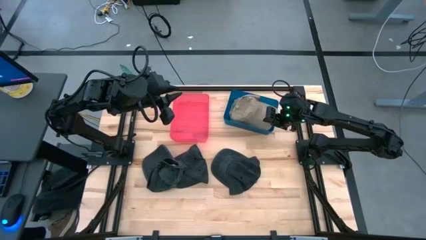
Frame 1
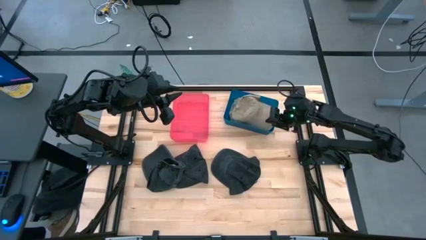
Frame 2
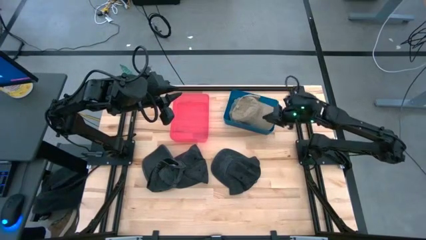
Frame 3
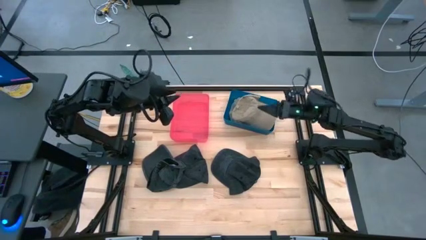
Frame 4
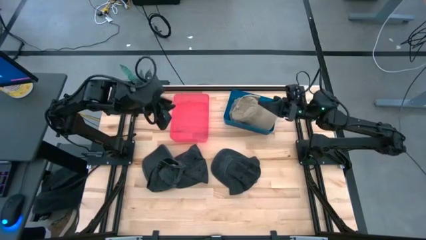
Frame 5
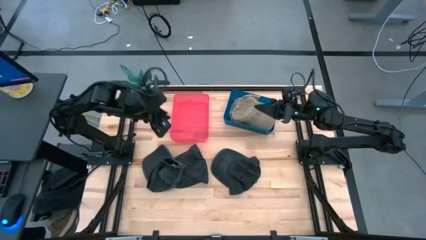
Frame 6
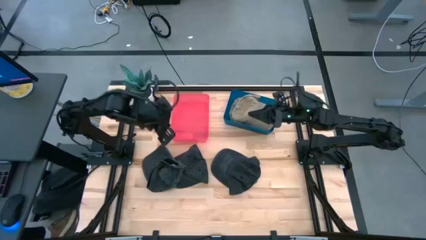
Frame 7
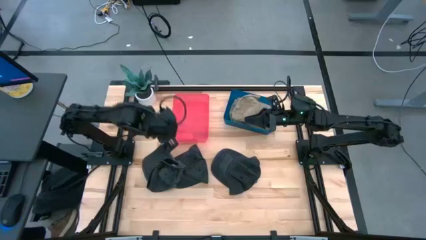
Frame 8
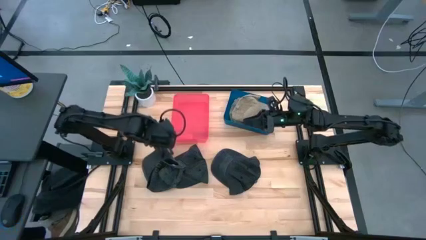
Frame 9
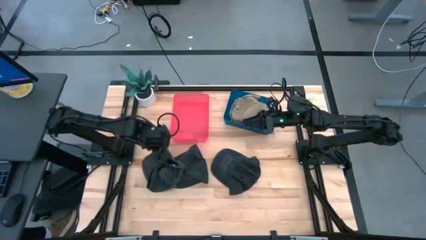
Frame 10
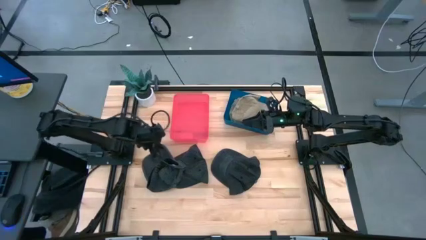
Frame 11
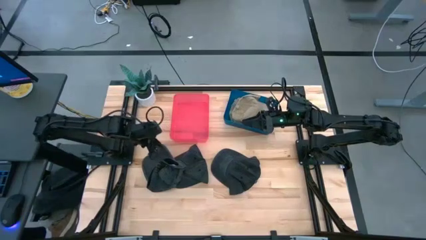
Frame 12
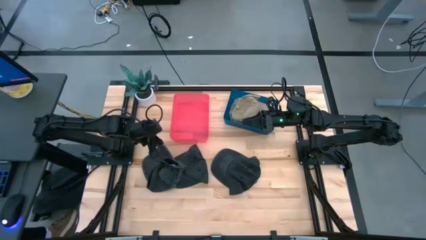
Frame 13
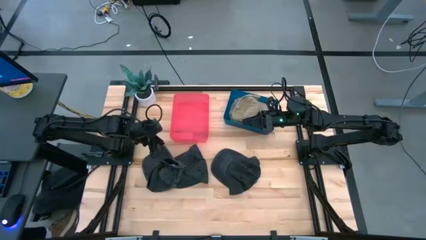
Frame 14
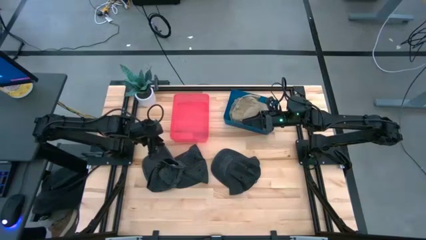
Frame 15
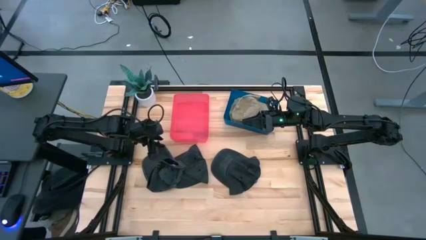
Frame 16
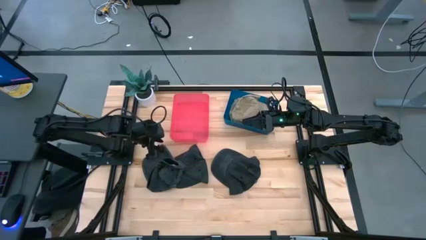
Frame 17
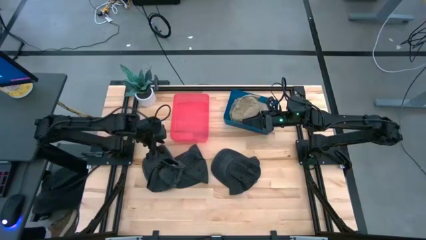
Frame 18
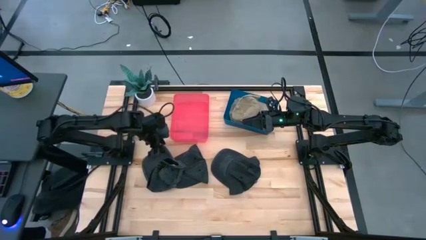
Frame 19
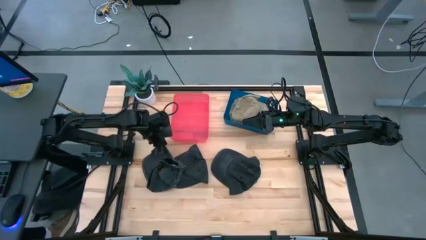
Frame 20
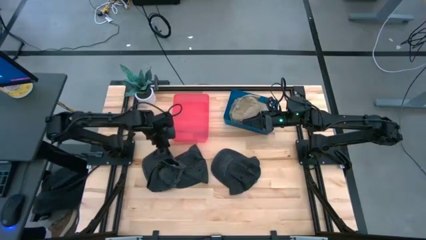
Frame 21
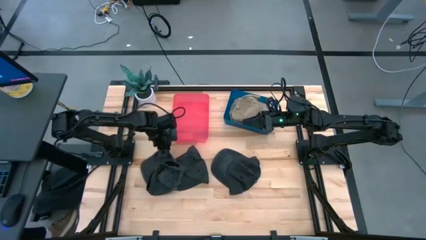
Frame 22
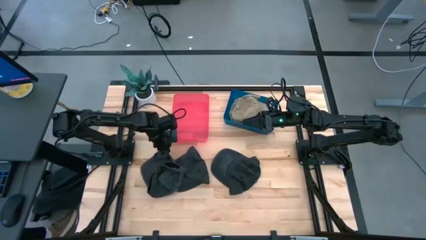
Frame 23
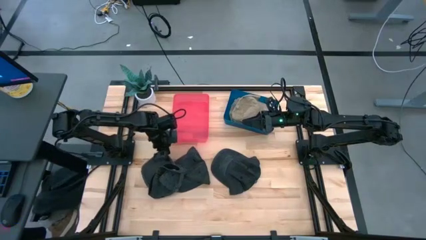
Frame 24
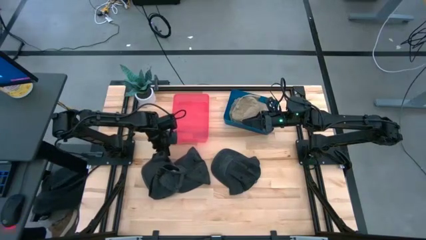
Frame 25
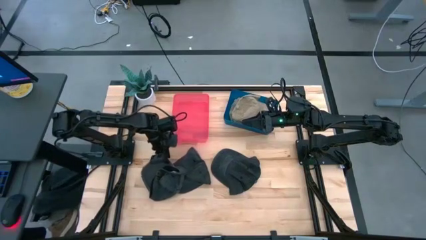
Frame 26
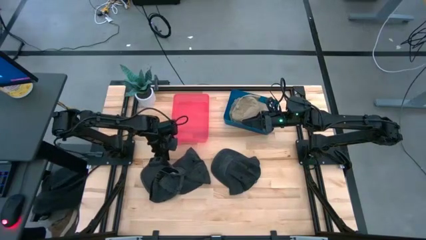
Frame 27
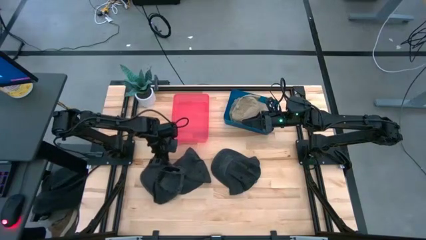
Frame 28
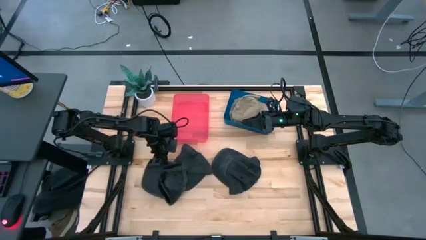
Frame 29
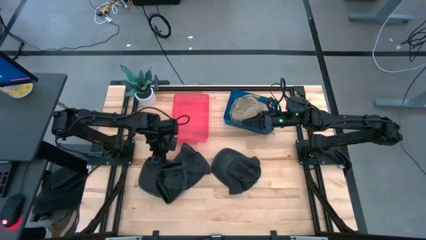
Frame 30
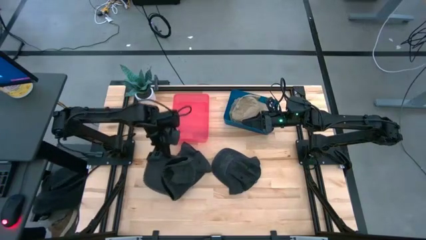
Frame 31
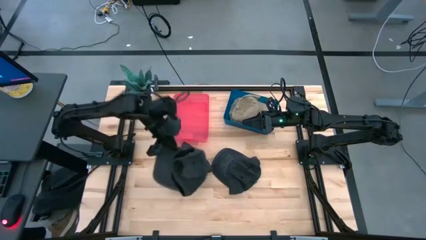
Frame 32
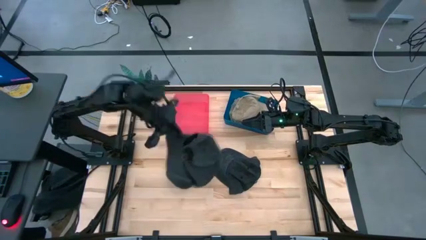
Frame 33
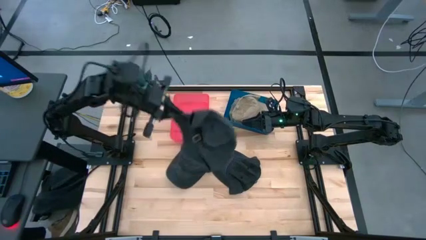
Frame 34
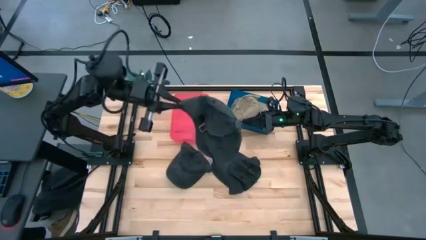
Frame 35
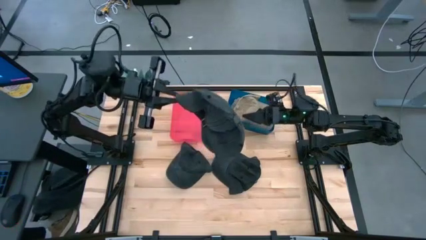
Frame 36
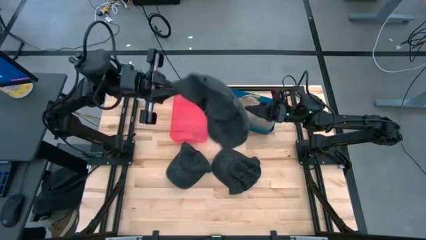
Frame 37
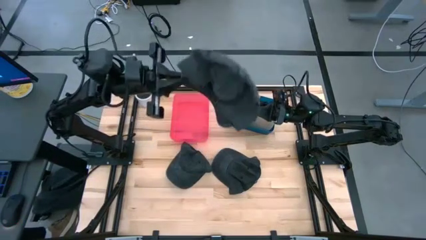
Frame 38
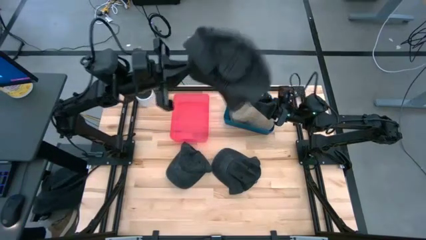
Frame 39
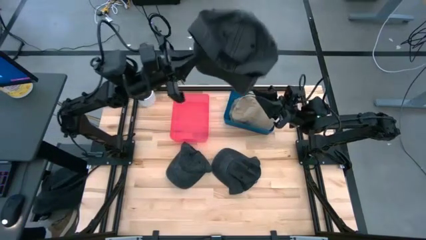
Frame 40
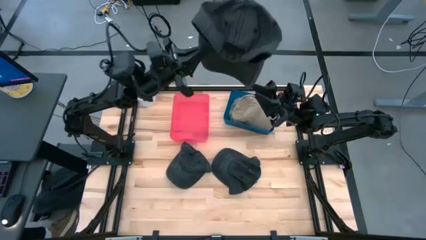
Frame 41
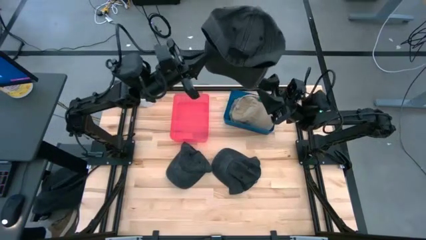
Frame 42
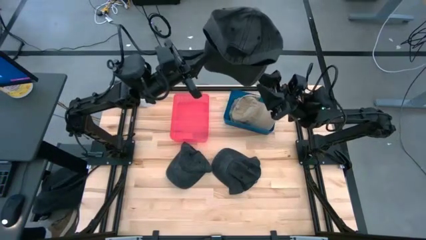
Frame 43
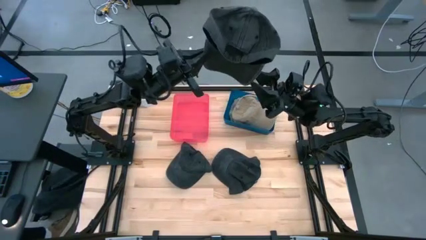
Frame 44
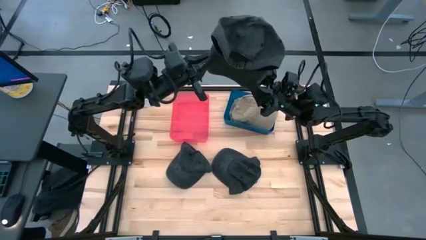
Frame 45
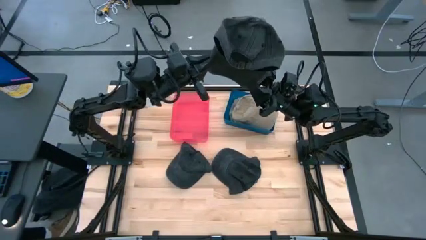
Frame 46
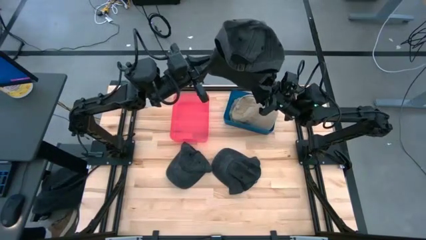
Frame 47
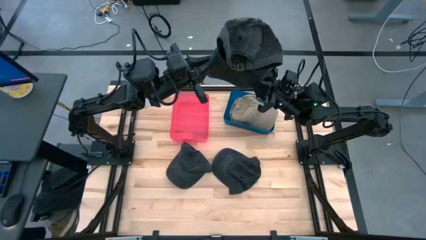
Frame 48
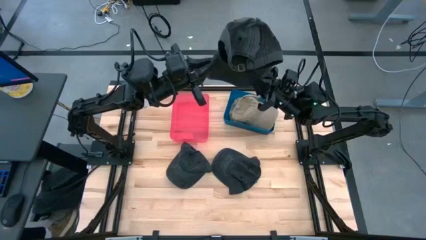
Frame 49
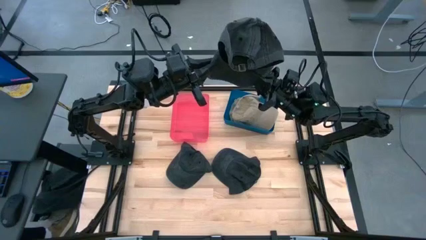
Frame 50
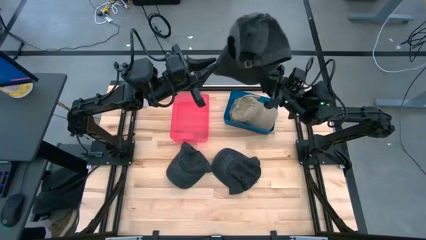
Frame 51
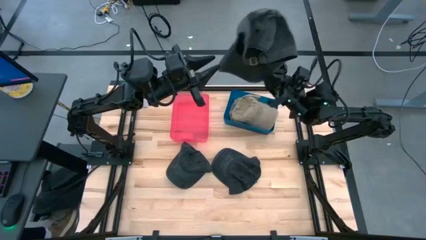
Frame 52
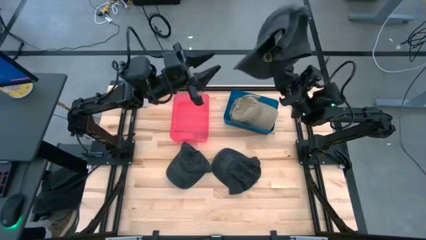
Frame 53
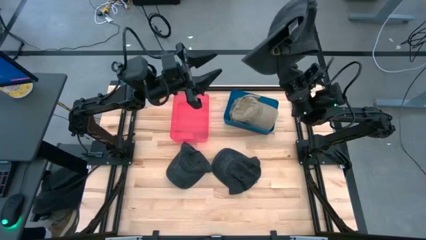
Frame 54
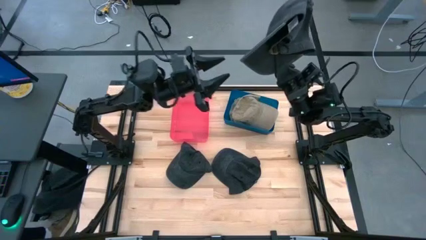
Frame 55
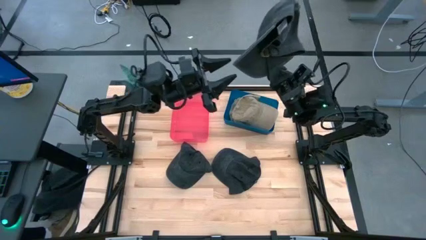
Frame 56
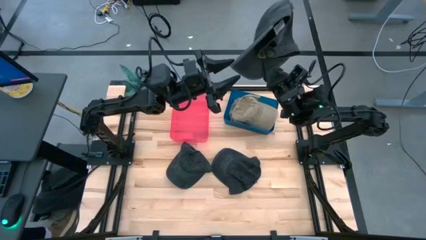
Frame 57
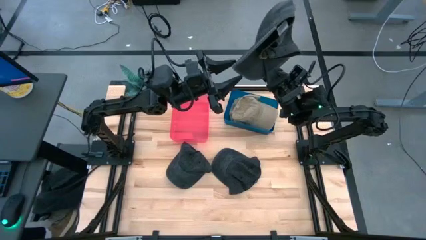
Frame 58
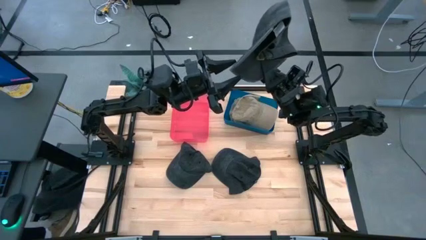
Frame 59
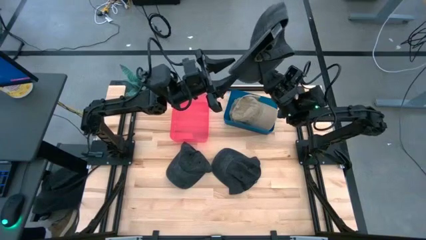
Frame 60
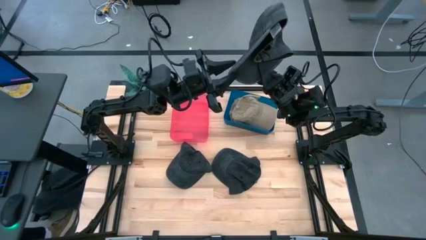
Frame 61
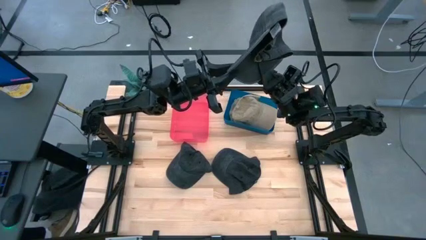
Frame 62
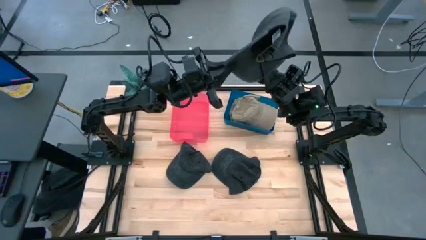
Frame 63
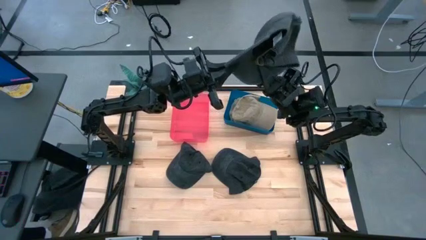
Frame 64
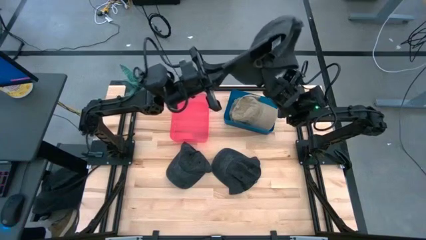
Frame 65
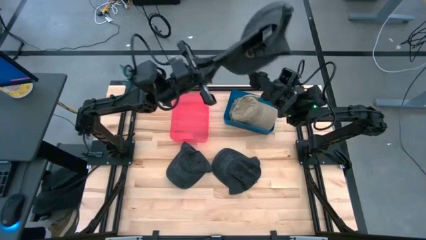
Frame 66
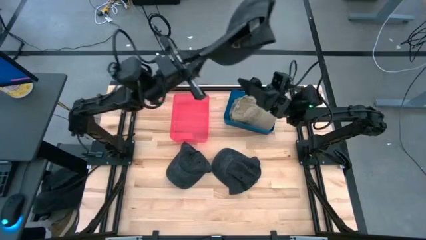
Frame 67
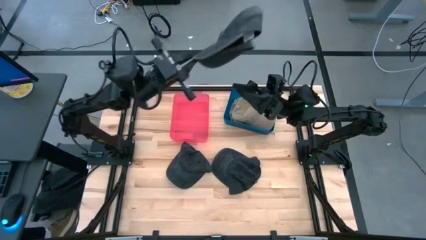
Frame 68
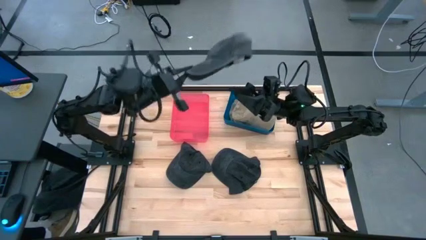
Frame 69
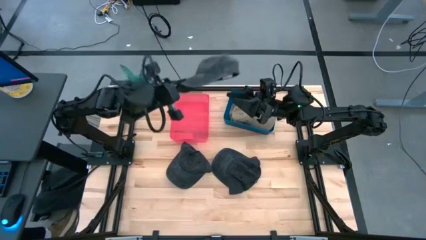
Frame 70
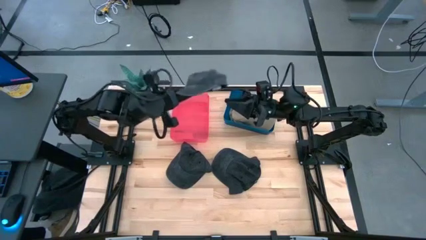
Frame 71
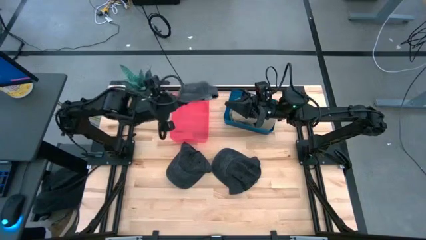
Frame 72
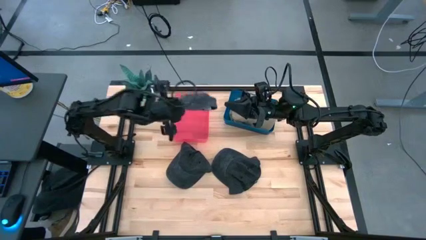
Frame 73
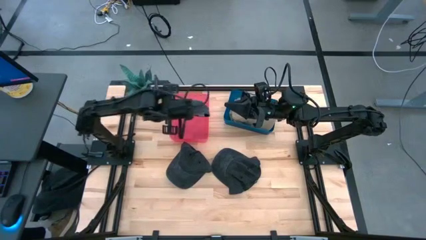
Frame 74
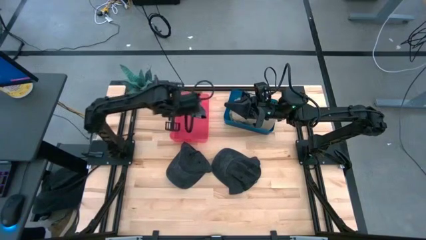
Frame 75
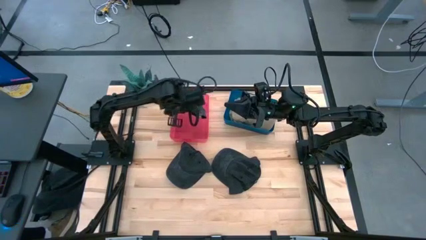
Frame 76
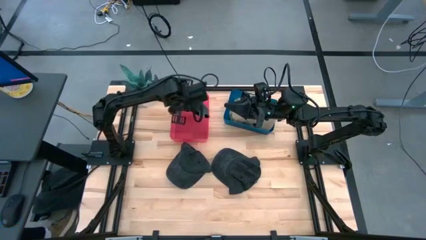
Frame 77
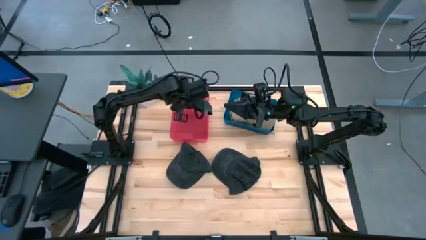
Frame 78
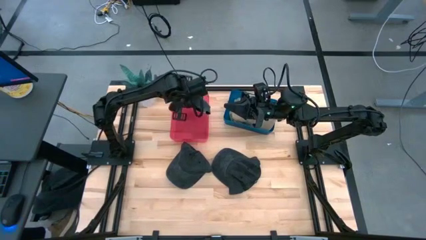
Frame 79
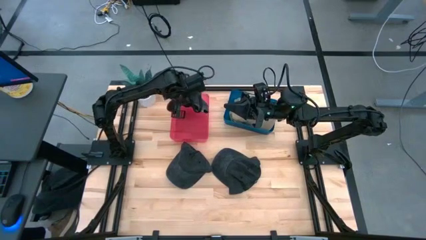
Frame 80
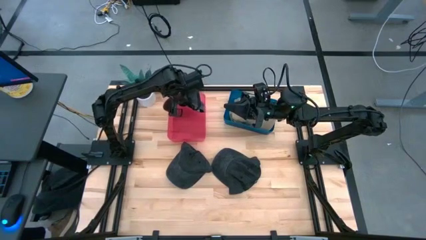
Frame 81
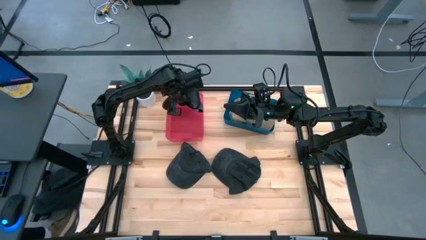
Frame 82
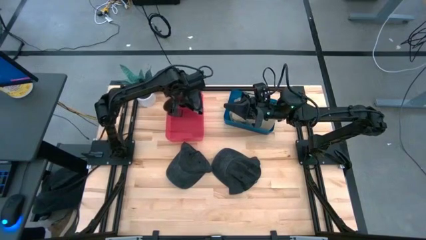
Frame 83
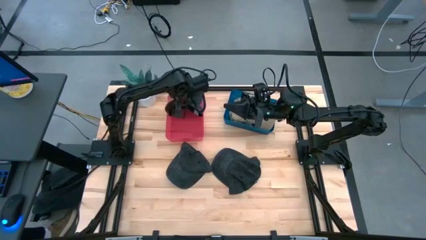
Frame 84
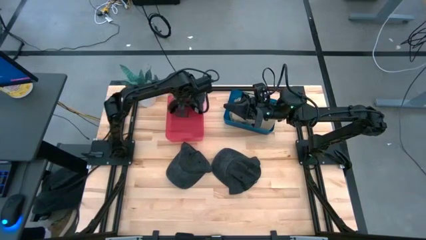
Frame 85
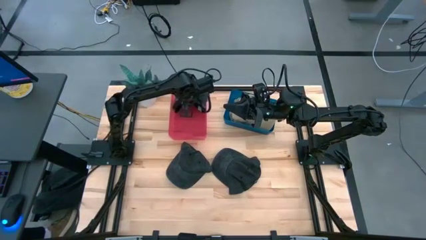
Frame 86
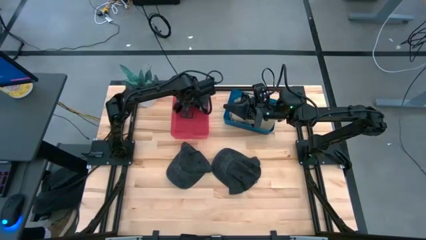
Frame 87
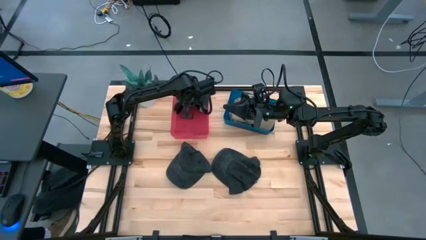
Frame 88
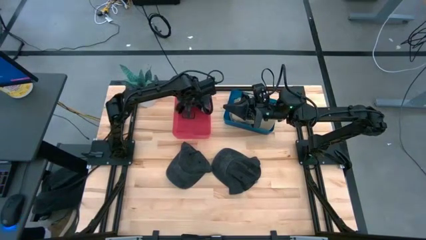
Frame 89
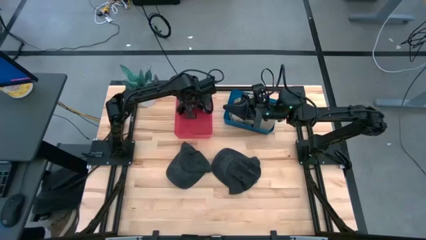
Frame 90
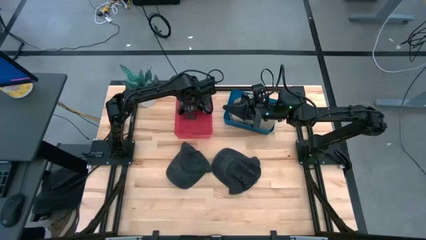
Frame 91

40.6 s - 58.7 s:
Task: Pick & Place hat
Put the left black cap into the blue bin
